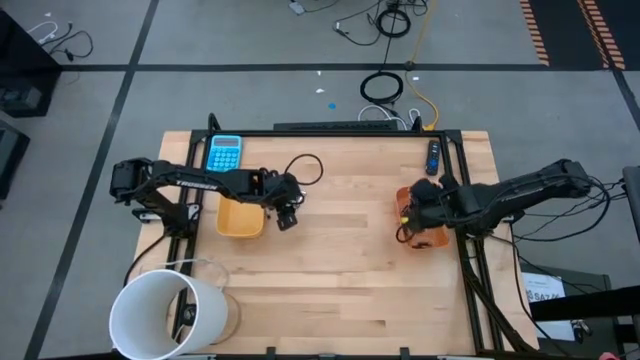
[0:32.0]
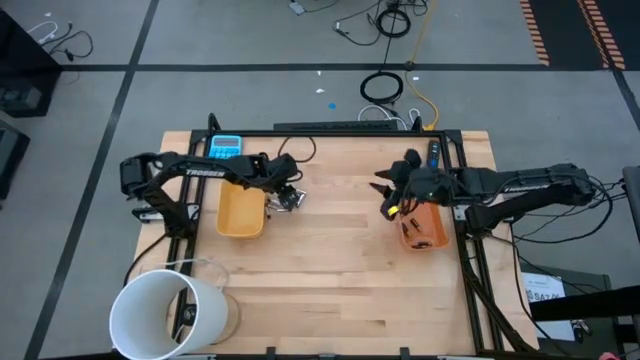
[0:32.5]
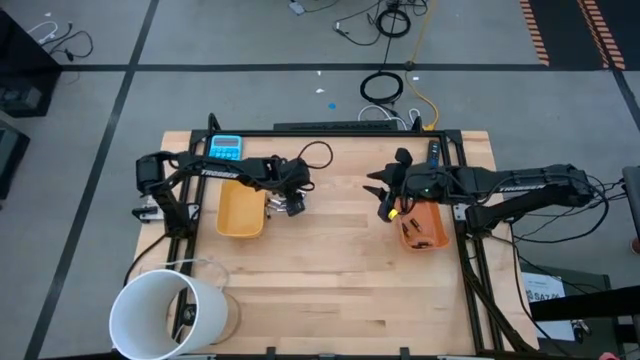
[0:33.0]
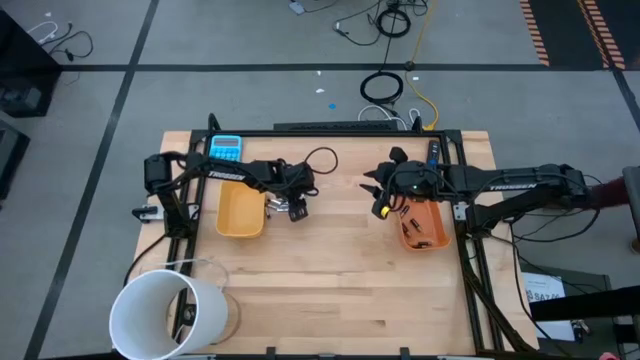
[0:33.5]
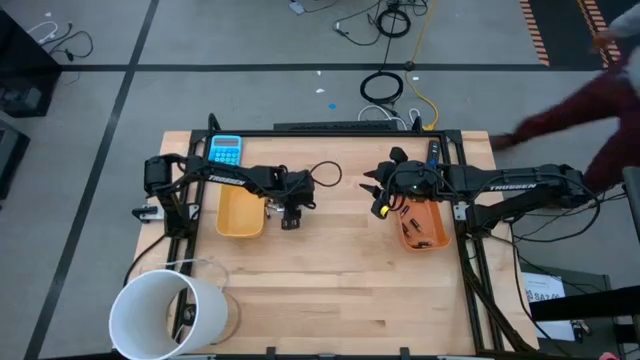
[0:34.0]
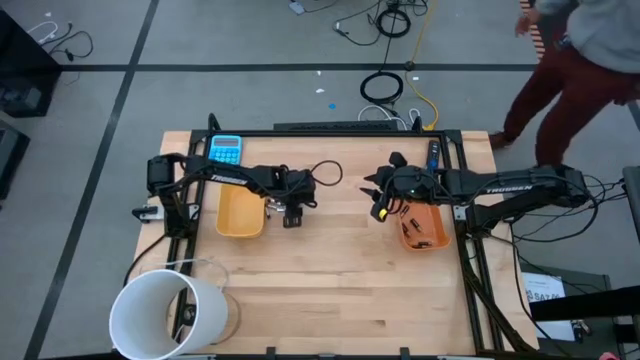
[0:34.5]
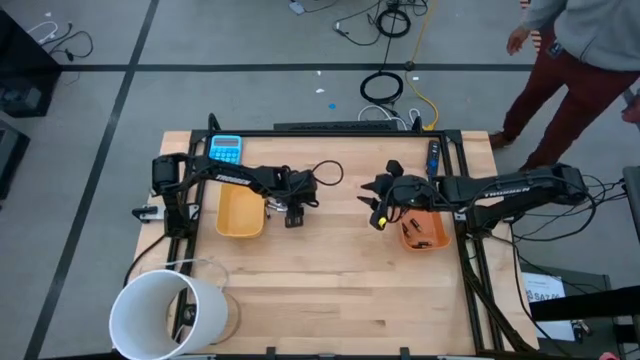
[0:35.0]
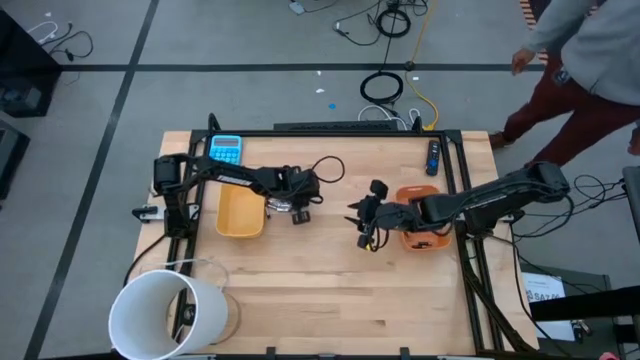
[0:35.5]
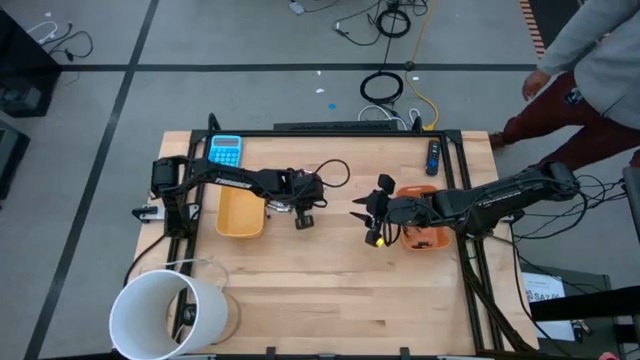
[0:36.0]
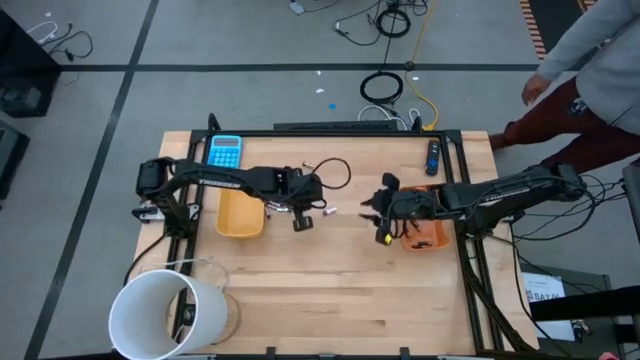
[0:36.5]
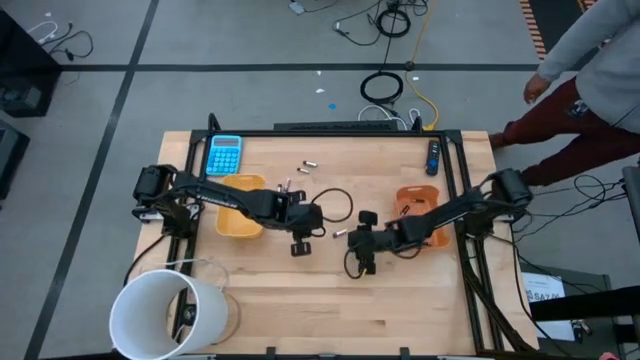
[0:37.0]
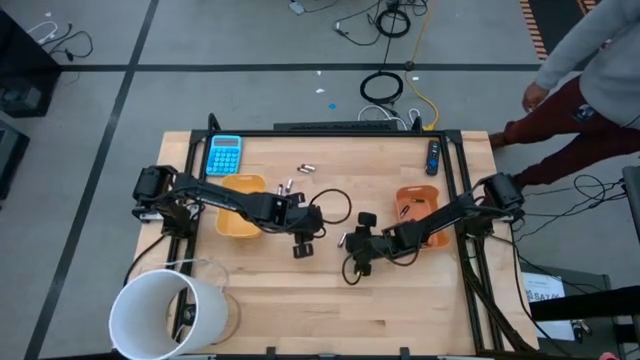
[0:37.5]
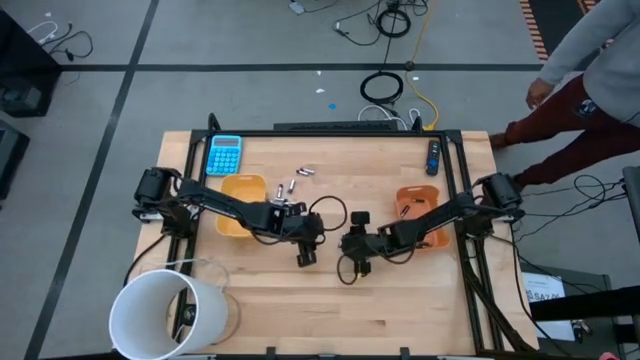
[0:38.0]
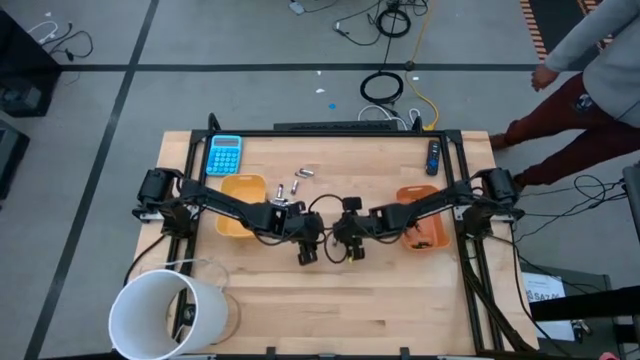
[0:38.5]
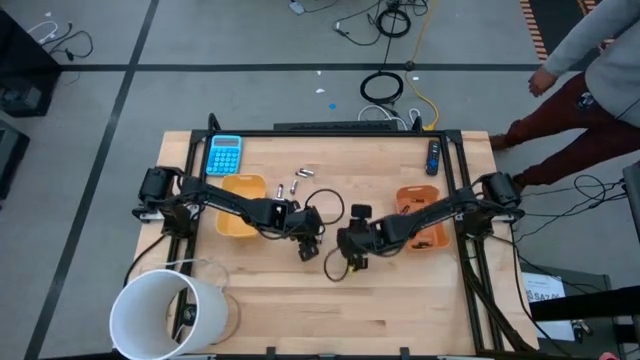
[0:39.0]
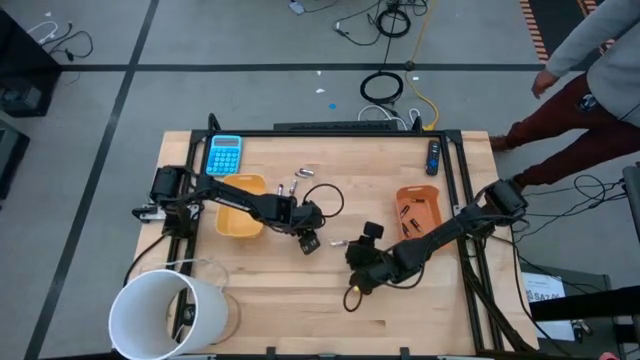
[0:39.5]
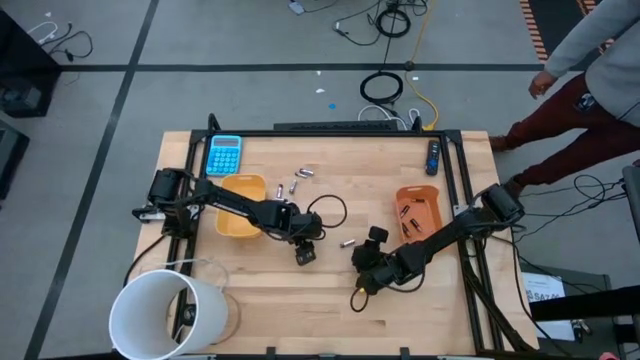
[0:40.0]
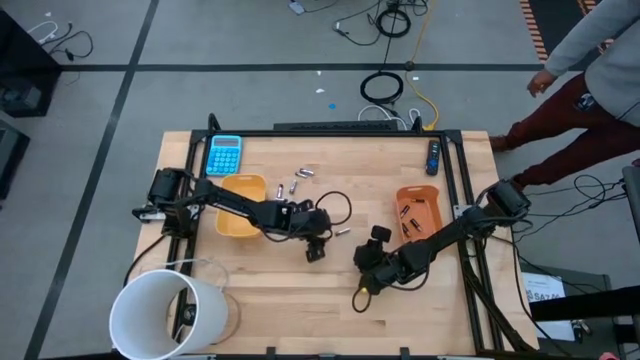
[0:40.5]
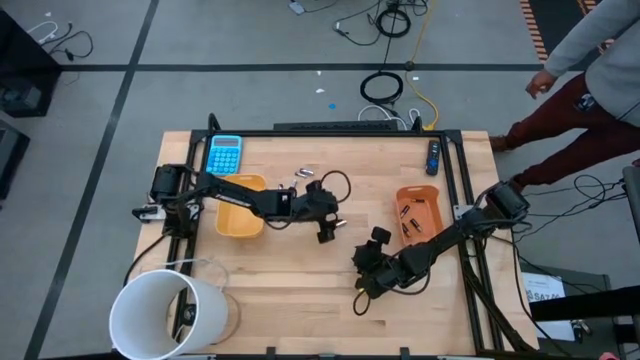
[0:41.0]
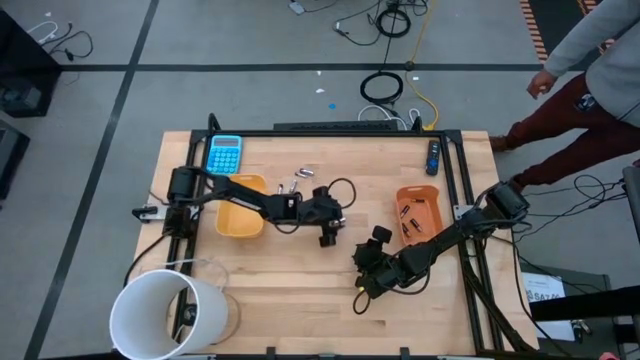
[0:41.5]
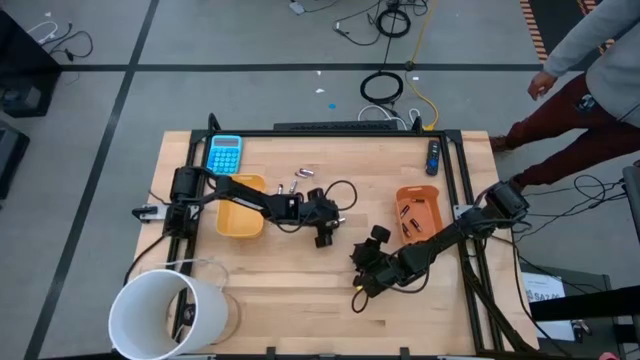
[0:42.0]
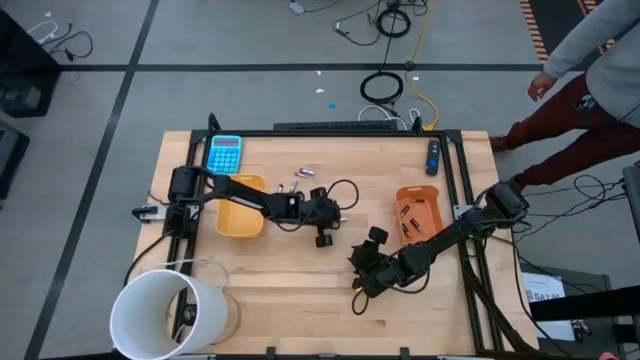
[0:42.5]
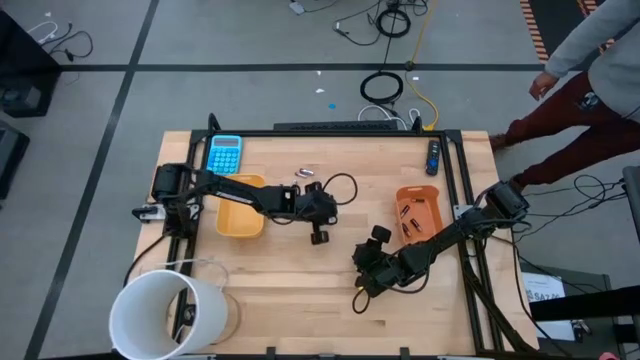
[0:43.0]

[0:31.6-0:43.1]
Task: Sort batteries
Put the silver battery into the yellow bin

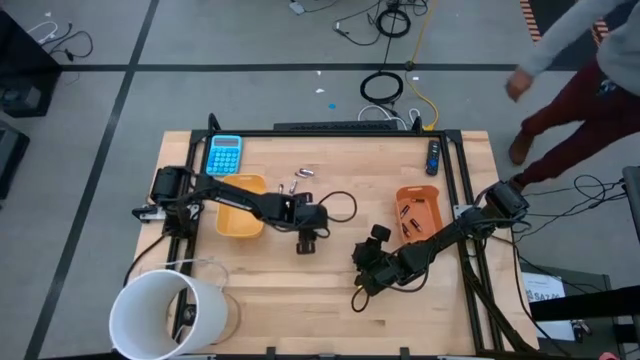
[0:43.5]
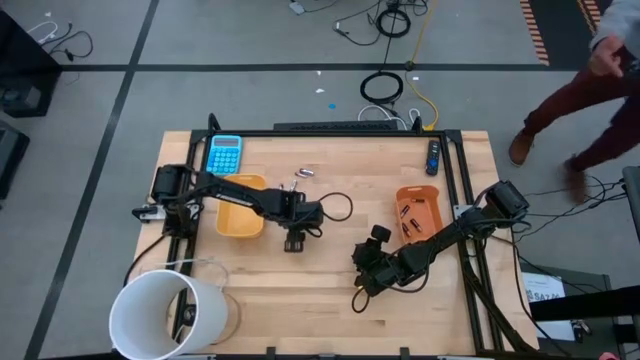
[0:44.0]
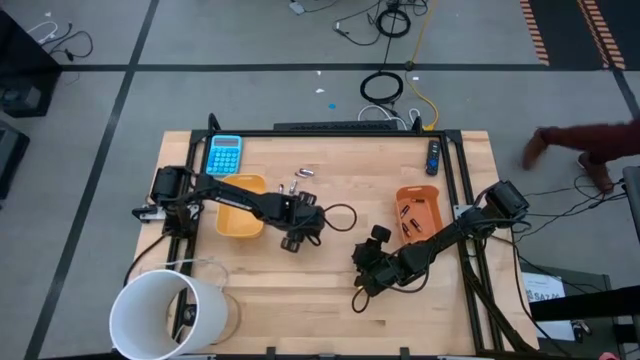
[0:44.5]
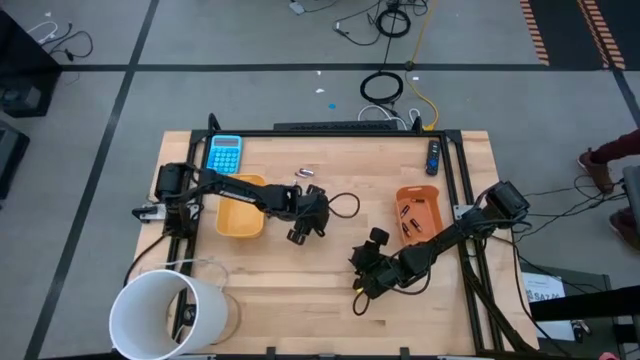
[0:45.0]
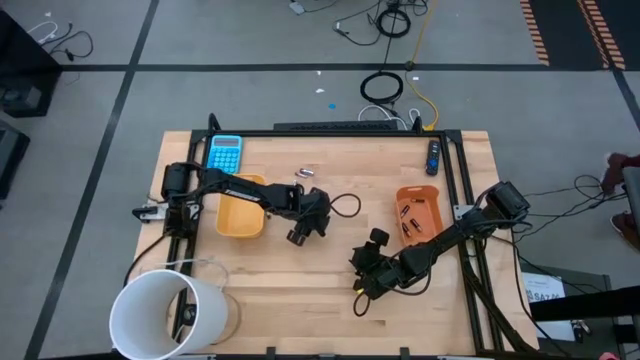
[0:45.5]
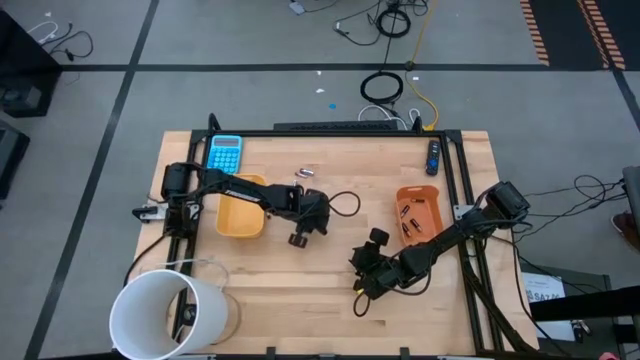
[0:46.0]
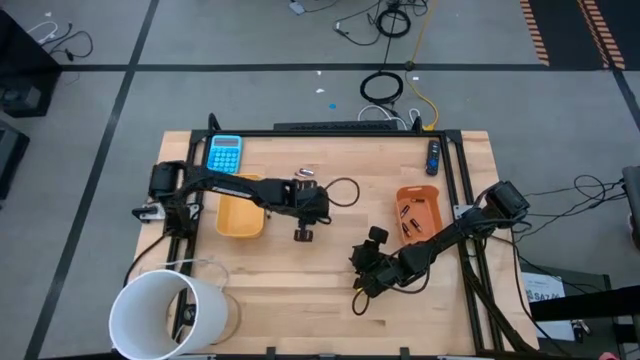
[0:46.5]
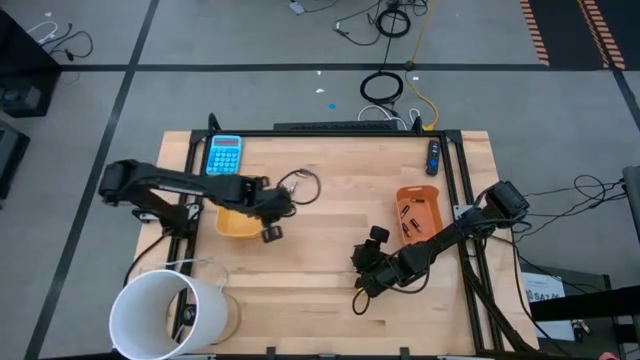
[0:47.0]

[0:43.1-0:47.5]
Put the silver battery into the yellow bin

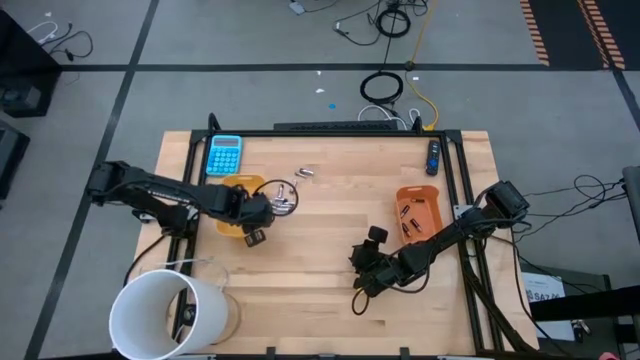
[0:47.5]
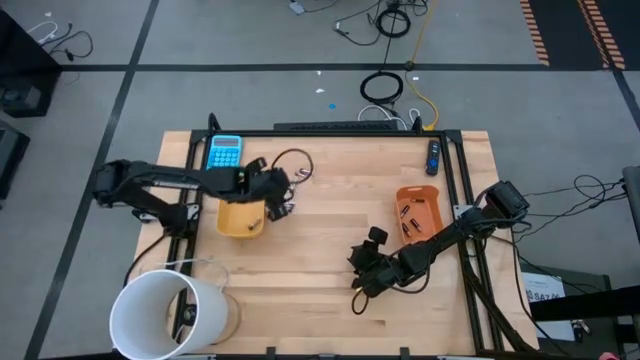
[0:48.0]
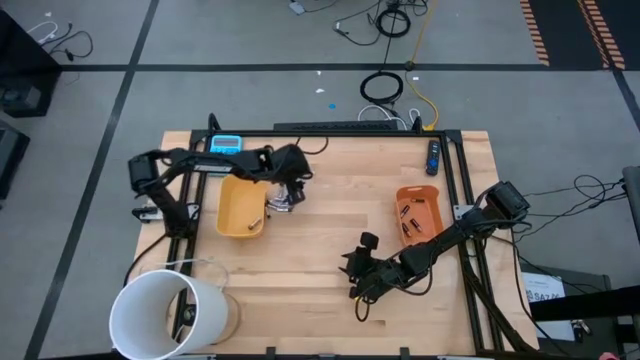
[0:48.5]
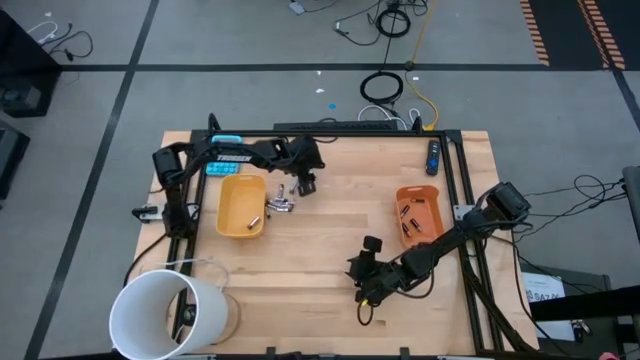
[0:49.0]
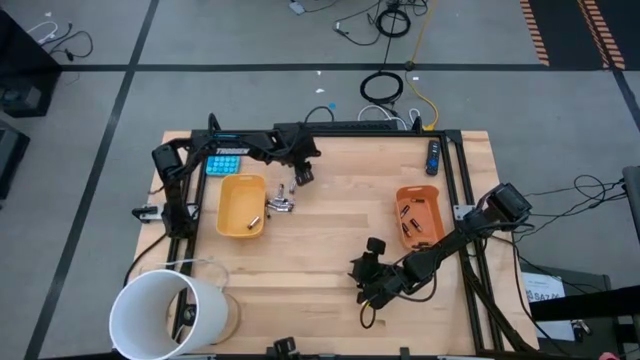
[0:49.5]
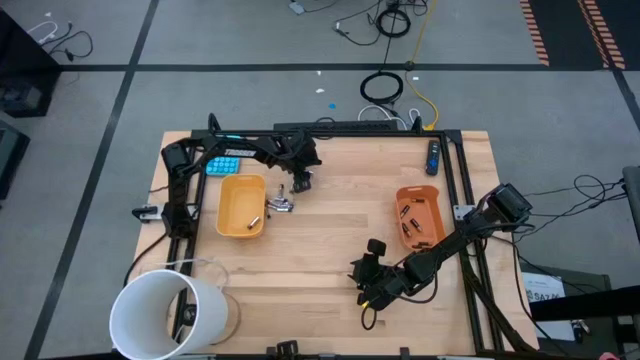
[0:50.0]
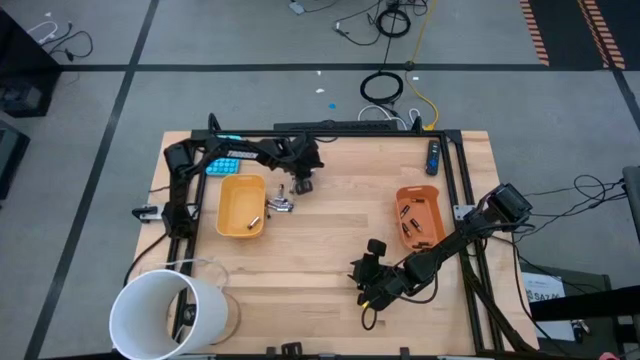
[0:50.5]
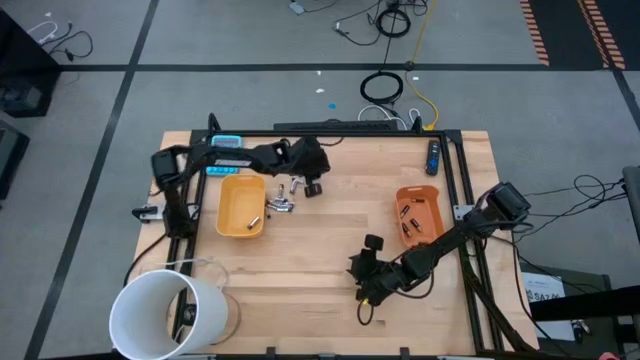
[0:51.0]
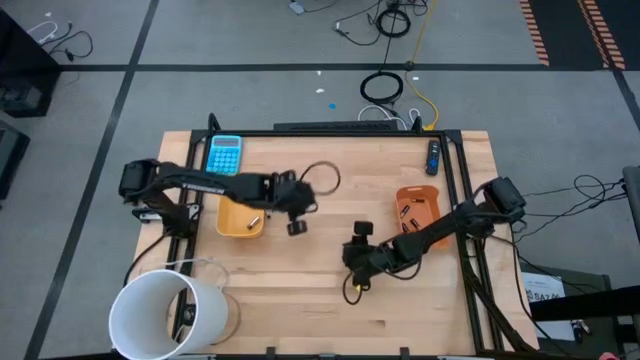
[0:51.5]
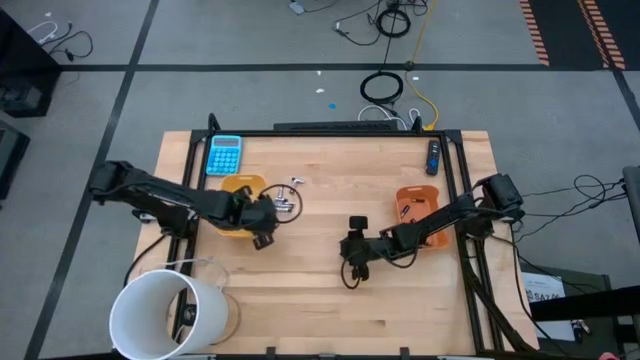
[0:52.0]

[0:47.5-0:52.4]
Put the silver battery into the yellow bin

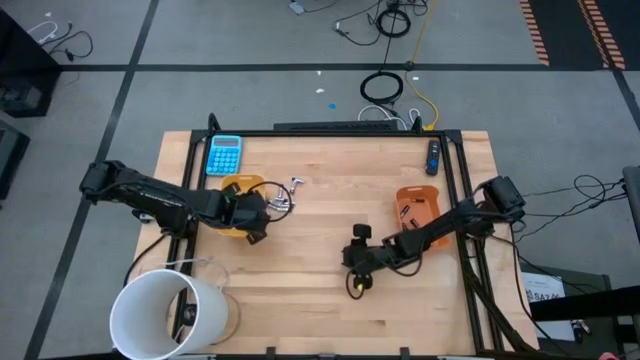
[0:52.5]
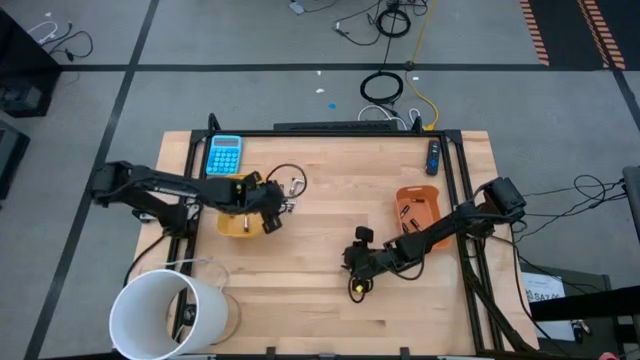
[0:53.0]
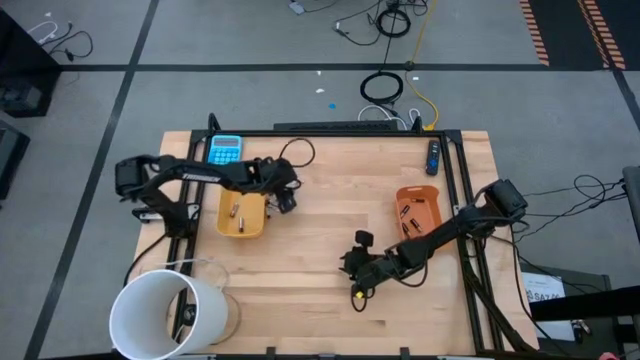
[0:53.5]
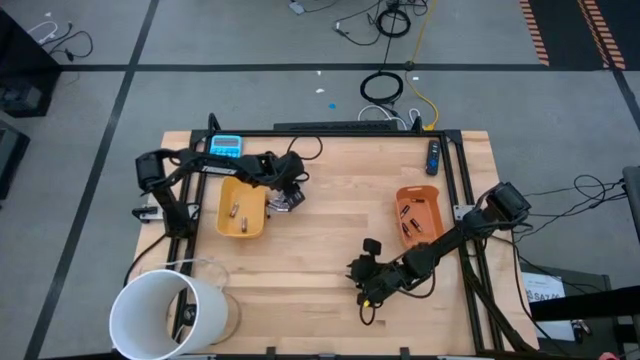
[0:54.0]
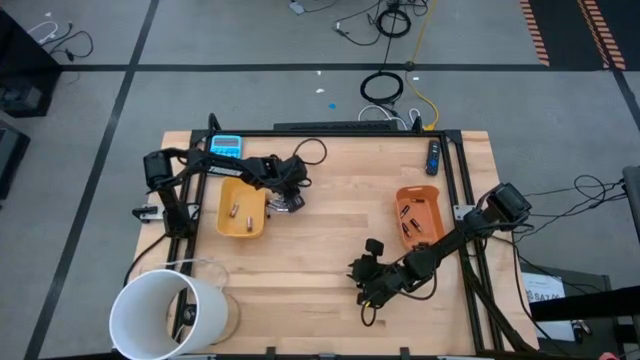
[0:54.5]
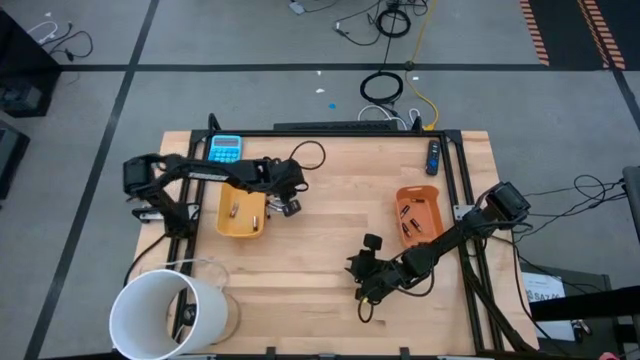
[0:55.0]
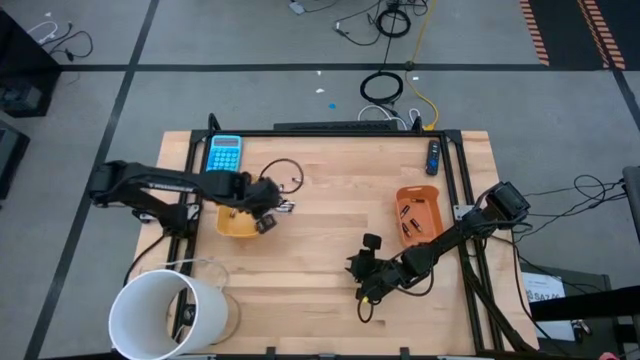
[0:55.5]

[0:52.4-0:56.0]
Put the silver battery into the yellow bin
